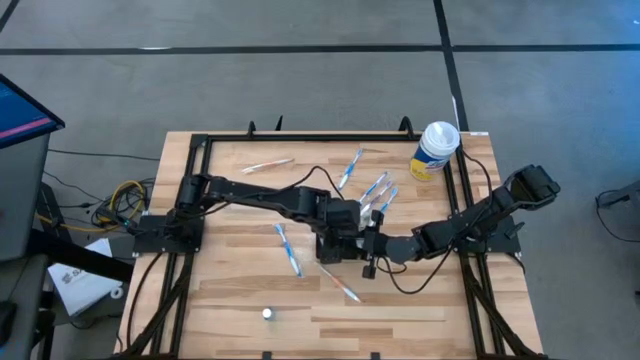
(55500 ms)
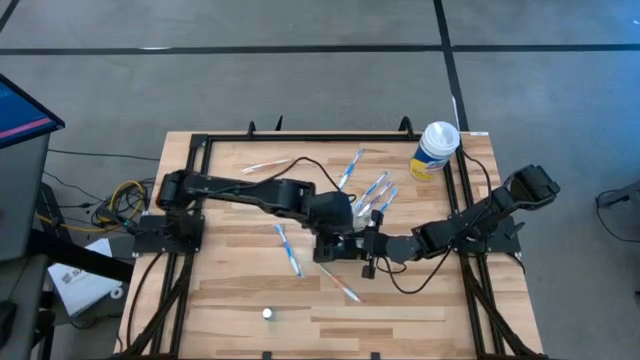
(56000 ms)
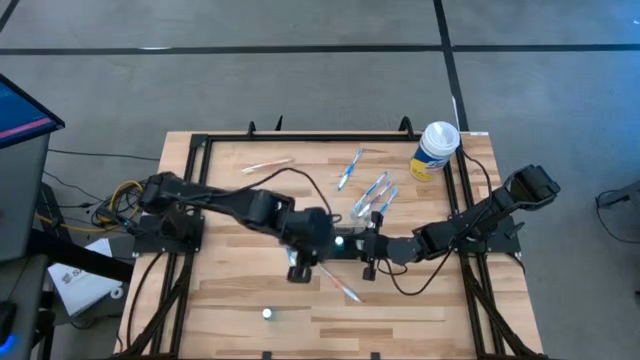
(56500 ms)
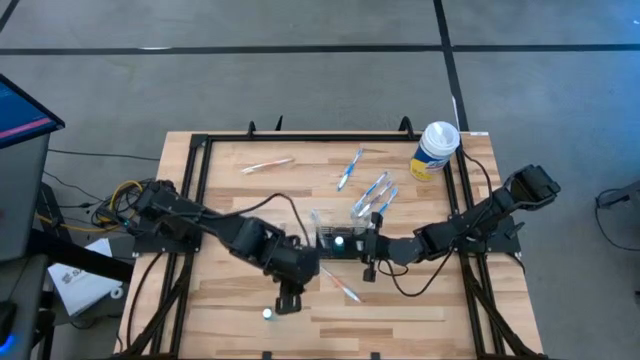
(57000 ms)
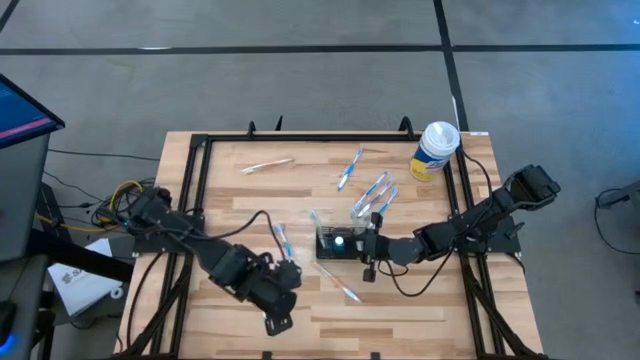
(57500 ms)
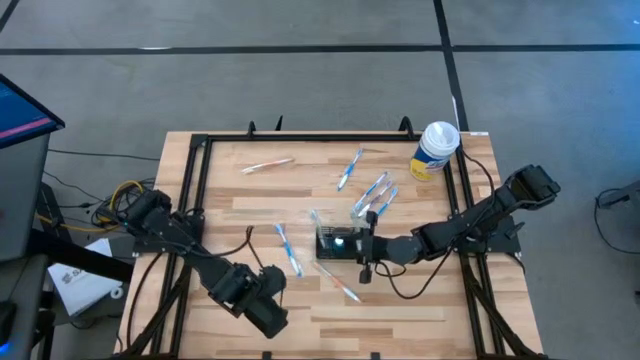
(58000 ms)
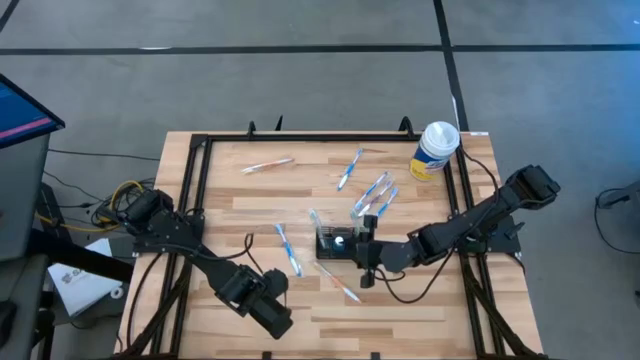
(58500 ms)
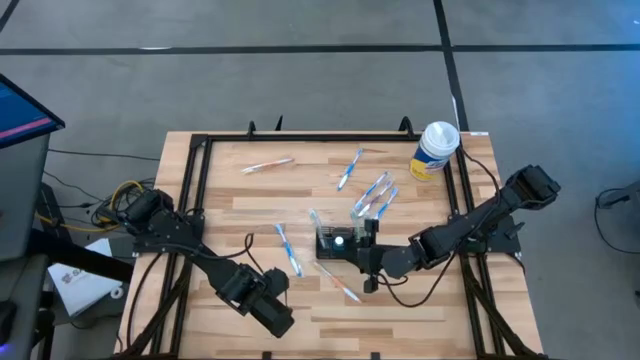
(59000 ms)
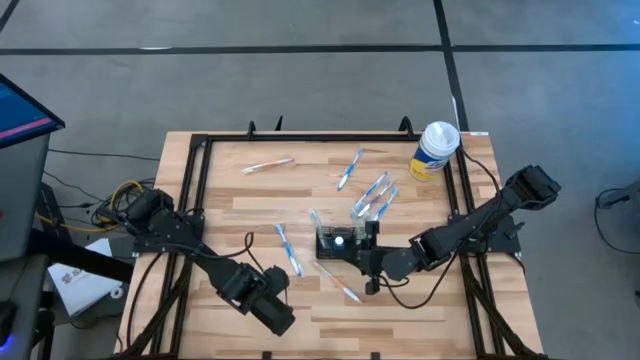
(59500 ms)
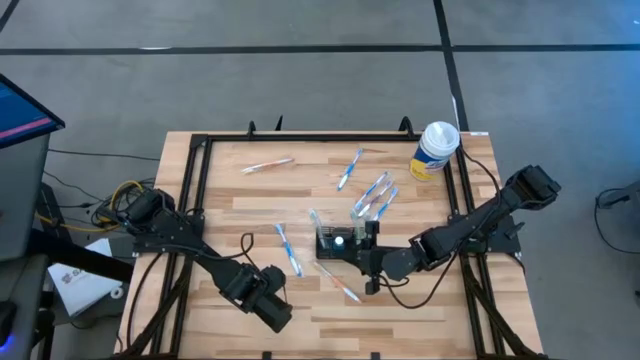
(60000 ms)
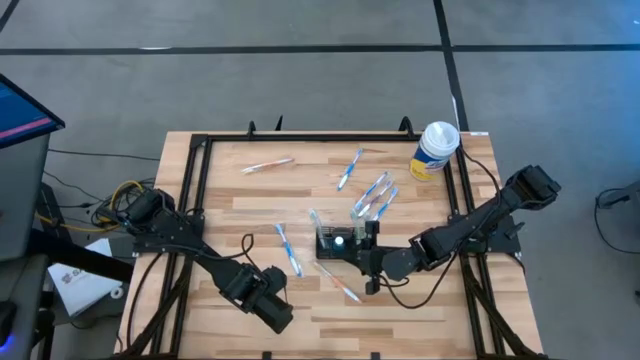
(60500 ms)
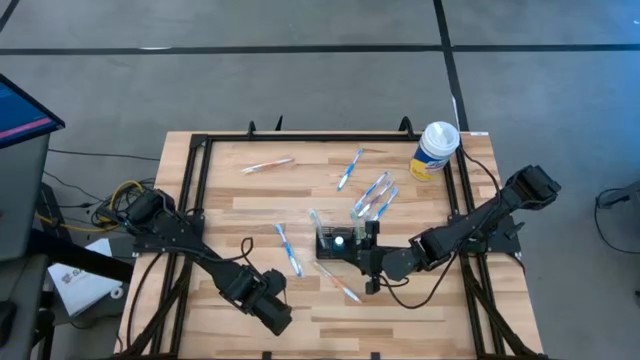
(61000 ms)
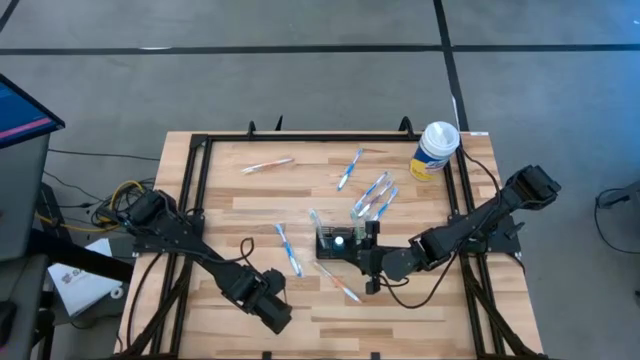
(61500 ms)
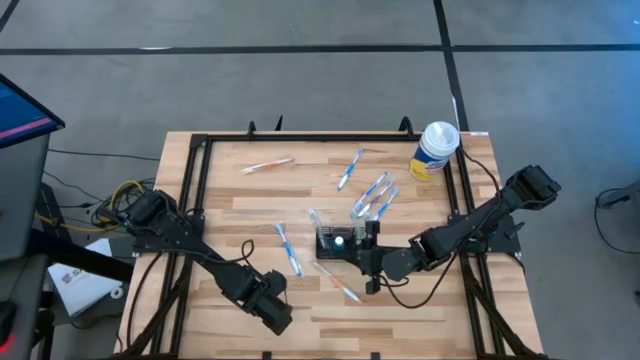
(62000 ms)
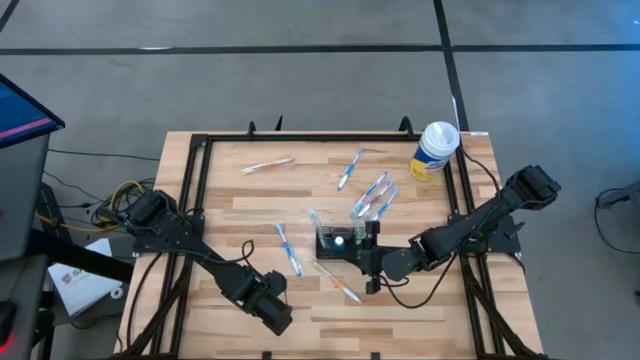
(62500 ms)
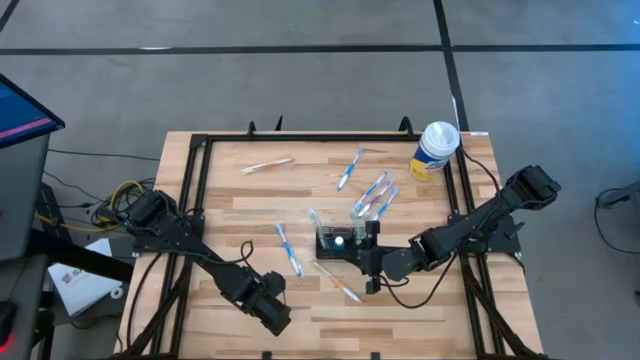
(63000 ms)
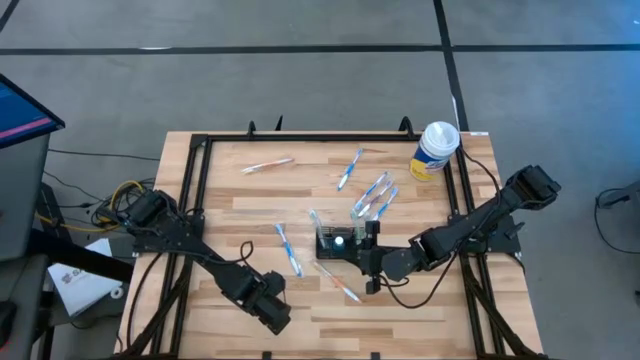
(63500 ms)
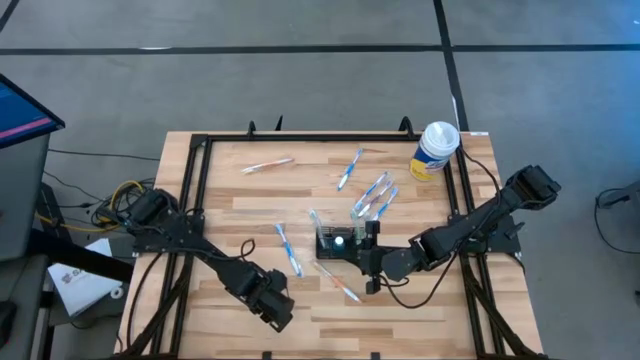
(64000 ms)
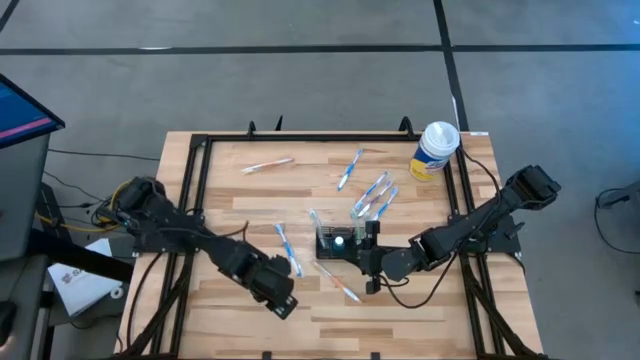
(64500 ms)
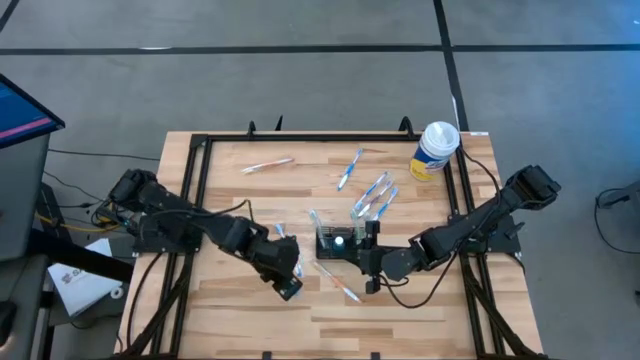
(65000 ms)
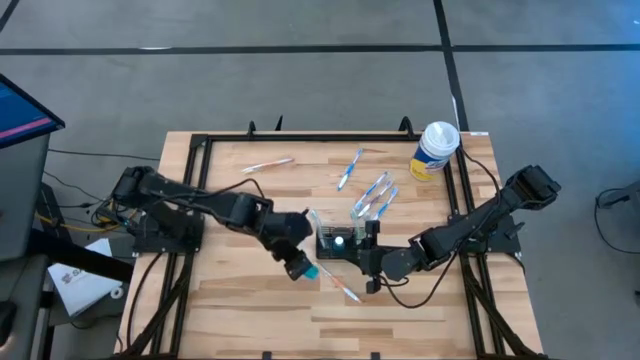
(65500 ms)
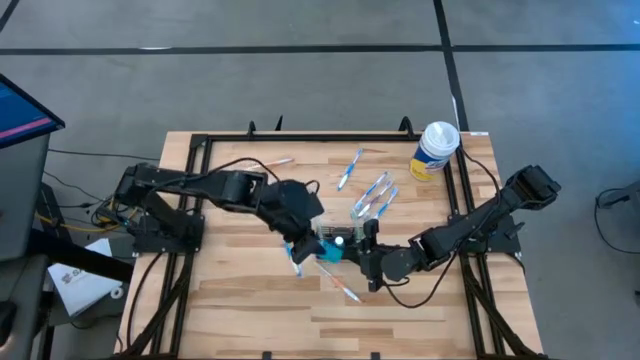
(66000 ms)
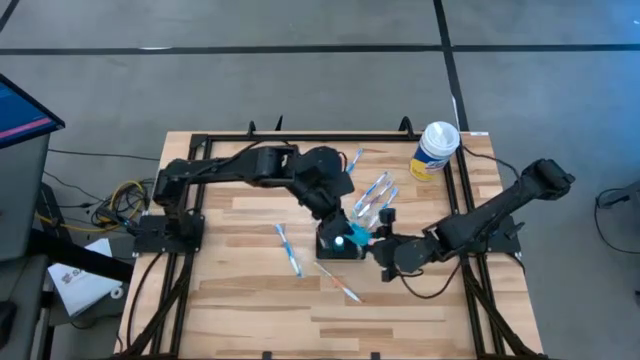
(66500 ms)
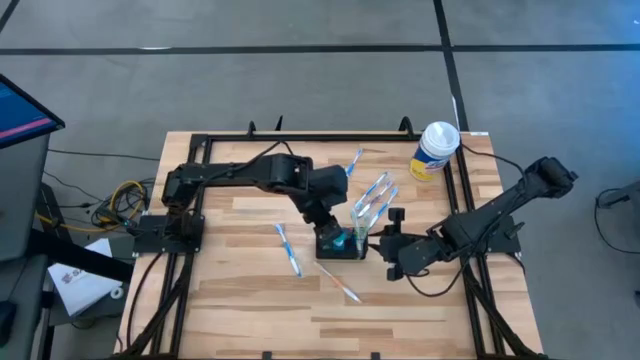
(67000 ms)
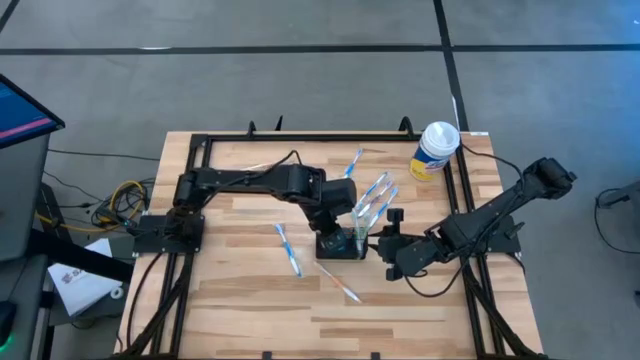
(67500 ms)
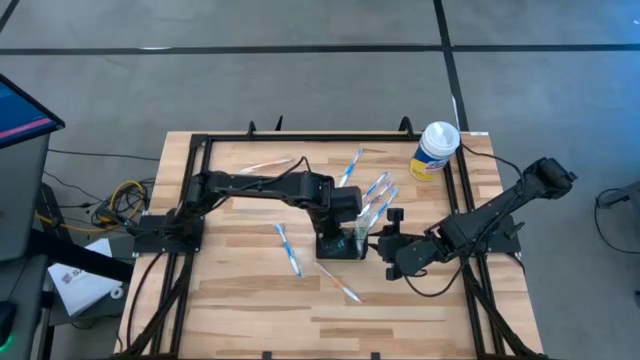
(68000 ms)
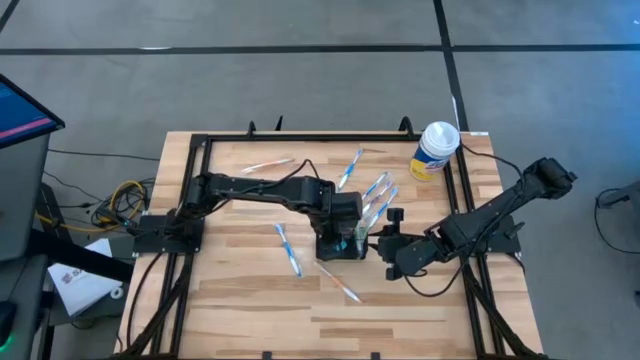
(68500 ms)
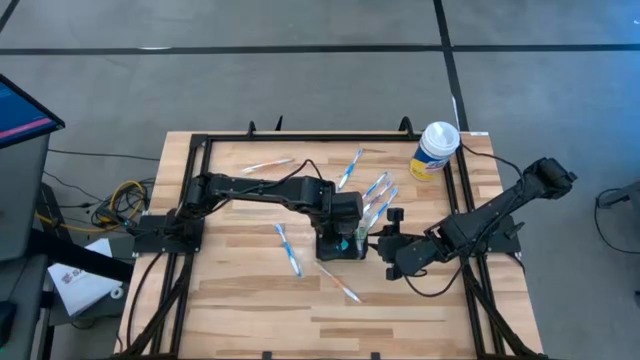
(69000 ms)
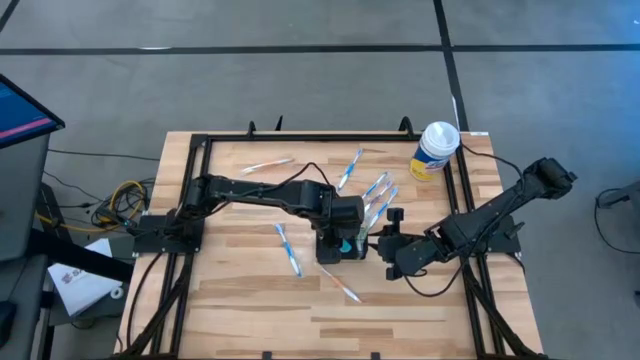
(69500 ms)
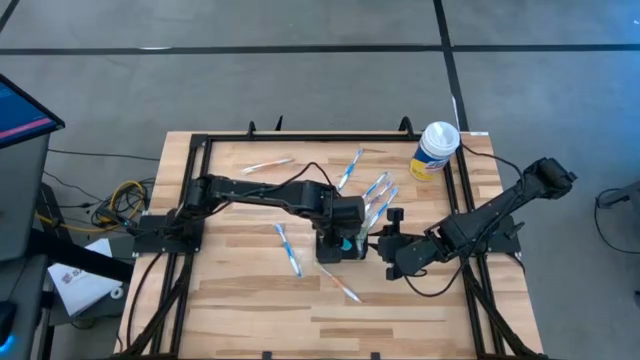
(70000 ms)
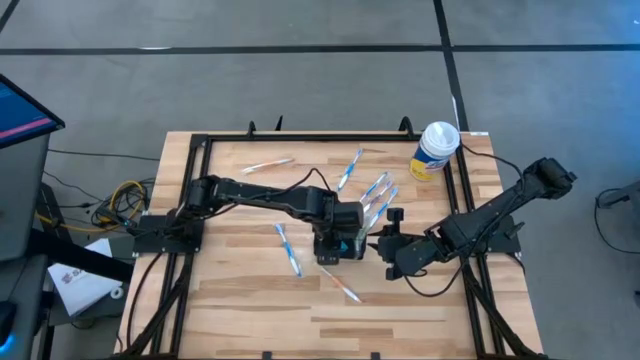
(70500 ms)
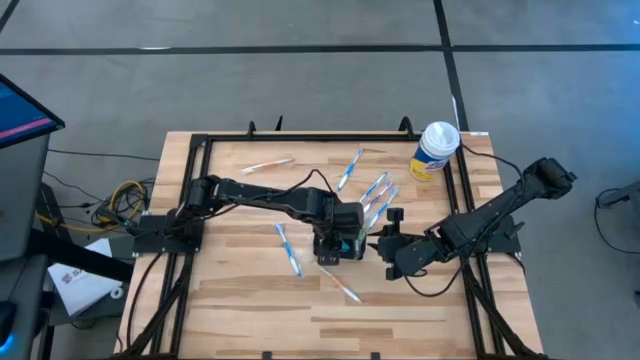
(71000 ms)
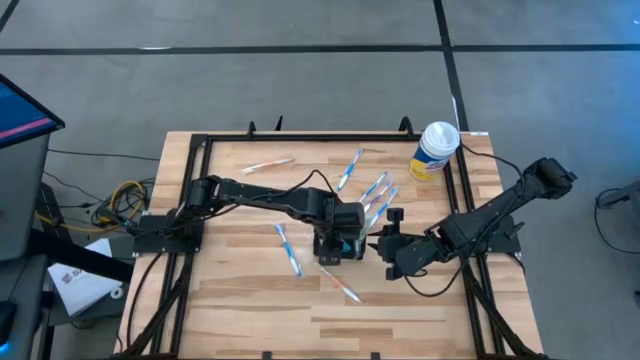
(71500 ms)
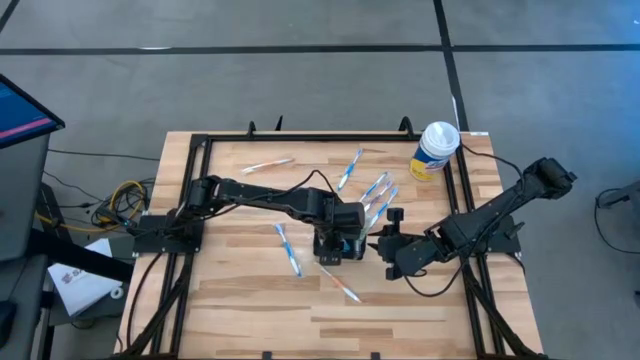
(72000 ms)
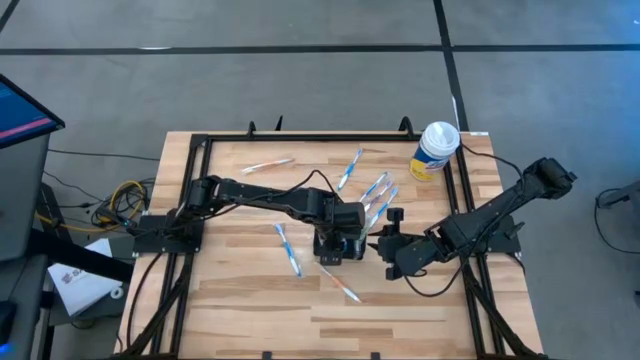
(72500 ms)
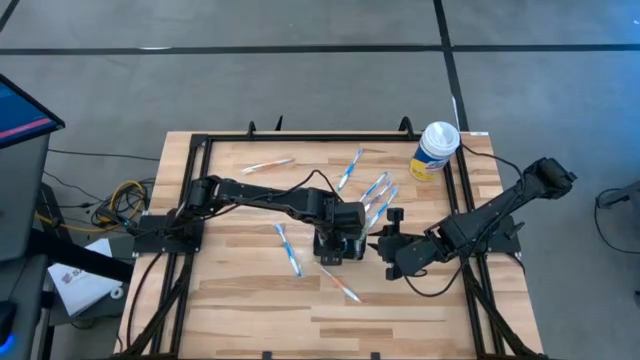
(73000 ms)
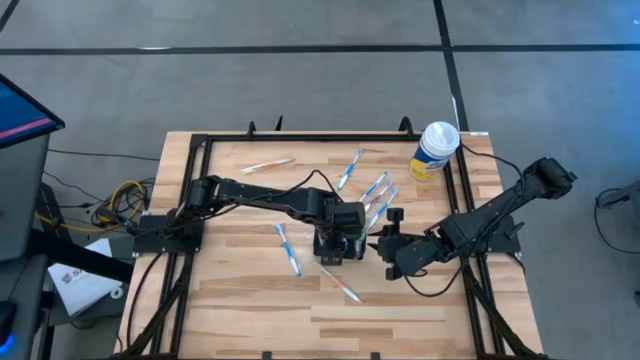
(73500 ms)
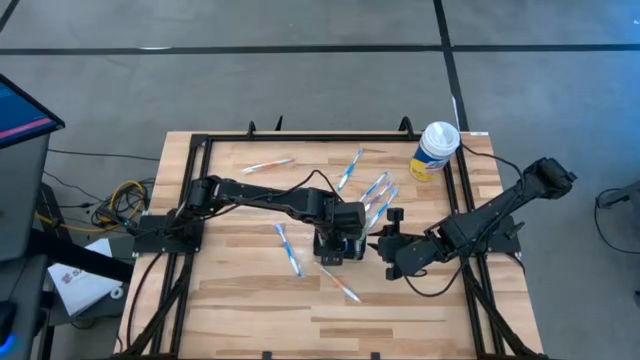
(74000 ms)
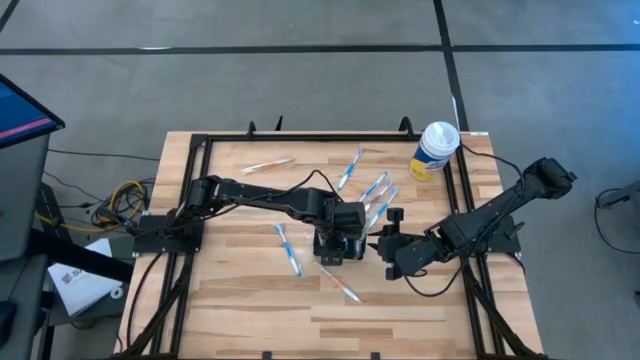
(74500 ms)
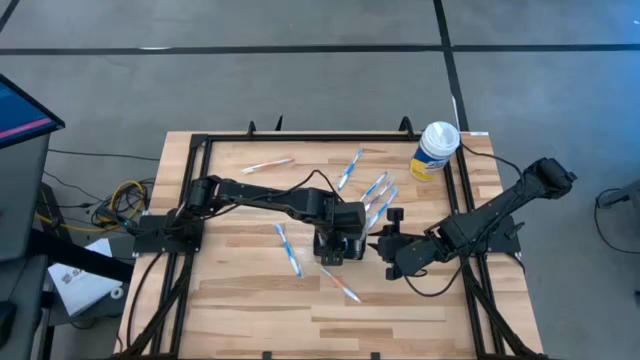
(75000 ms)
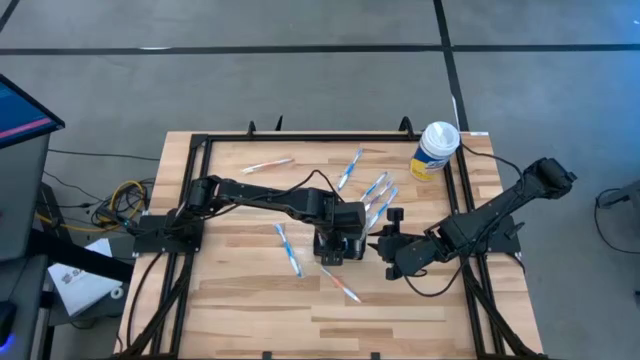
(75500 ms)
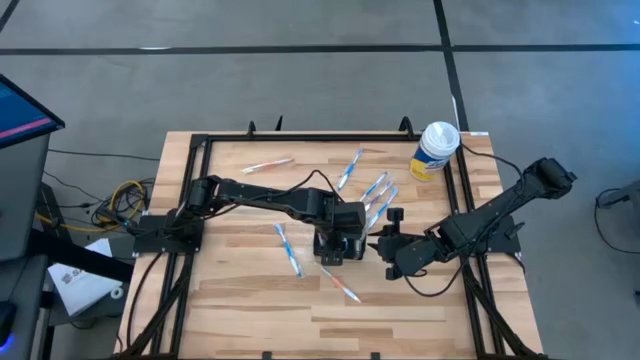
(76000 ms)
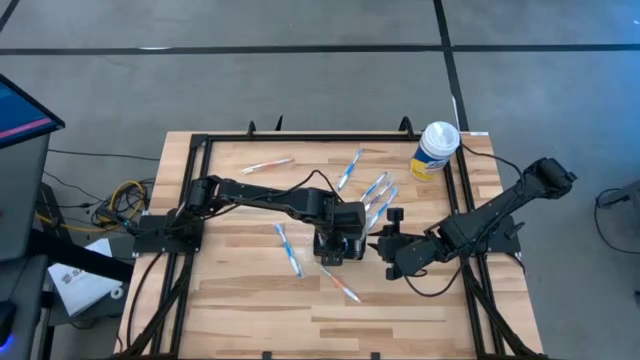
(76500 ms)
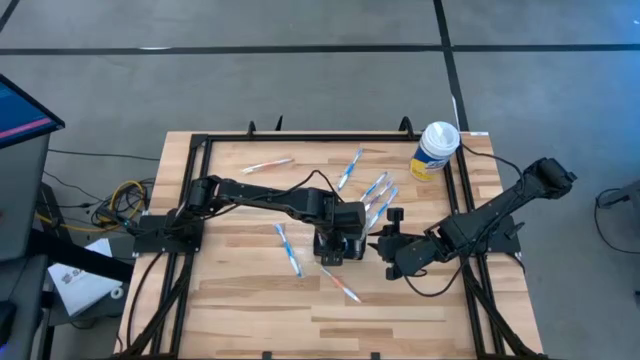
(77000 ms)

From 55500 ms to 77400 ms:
Task: Pick & Place toothbrushing station
Put the blue mouthwash into the wire organizer
